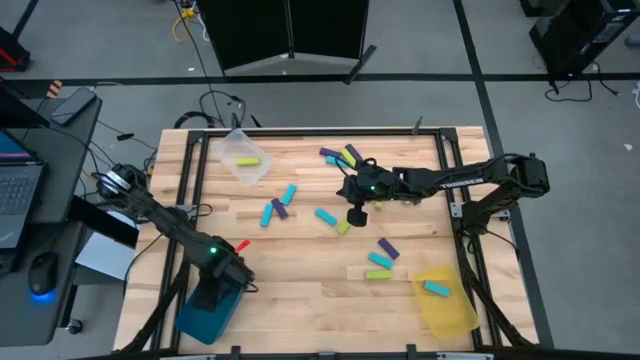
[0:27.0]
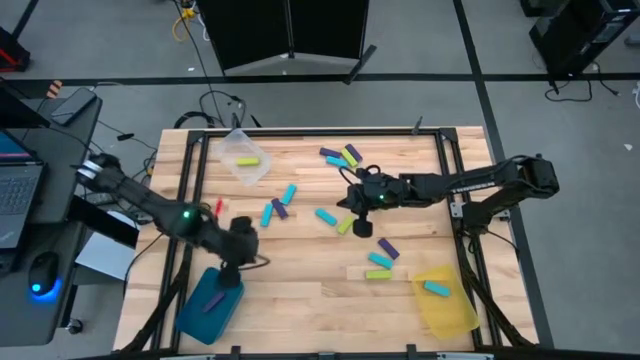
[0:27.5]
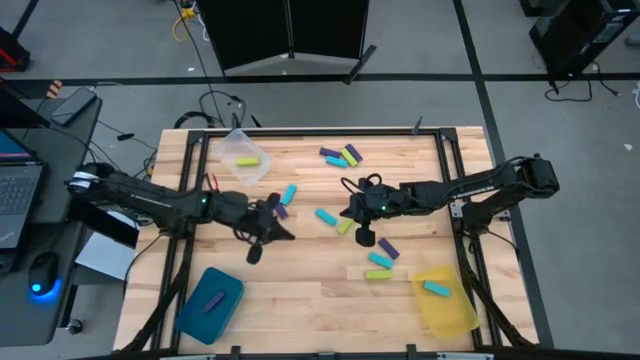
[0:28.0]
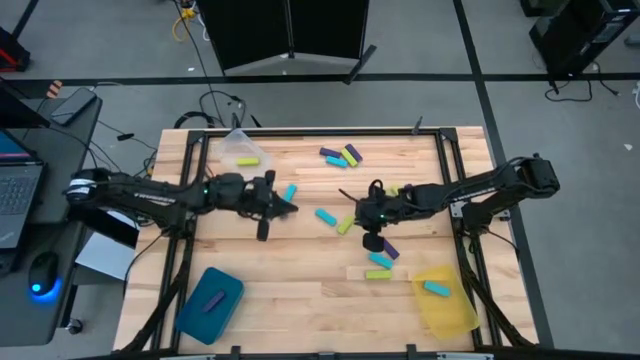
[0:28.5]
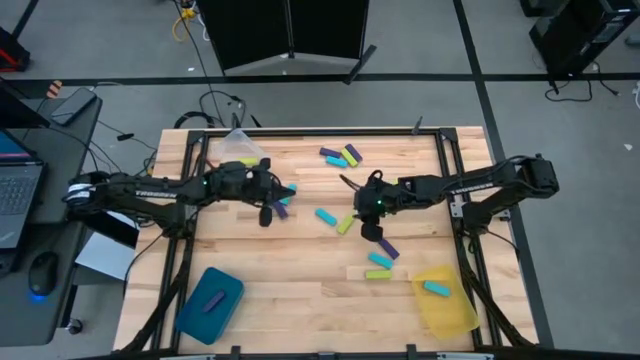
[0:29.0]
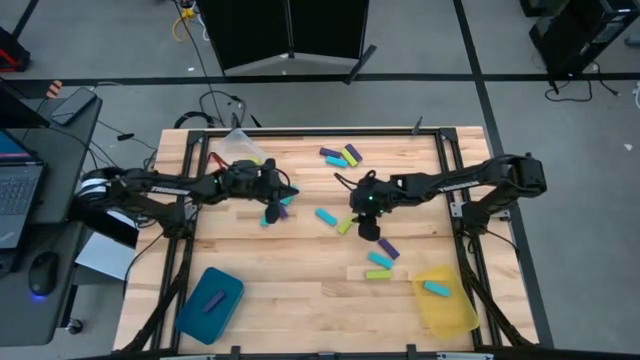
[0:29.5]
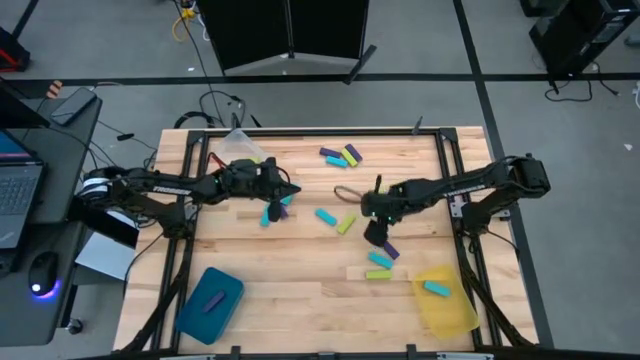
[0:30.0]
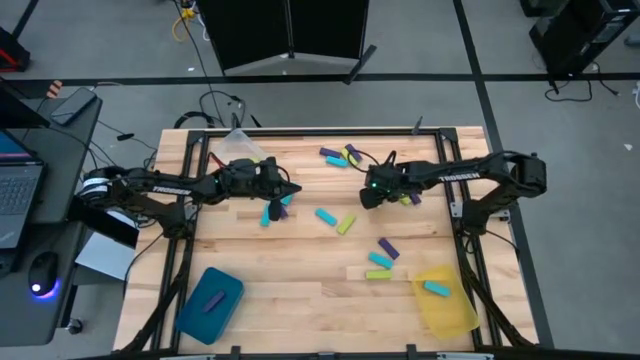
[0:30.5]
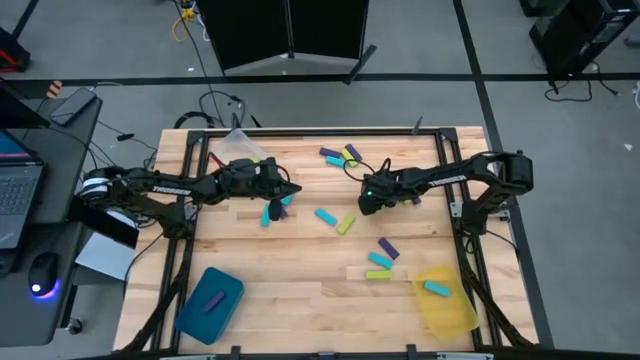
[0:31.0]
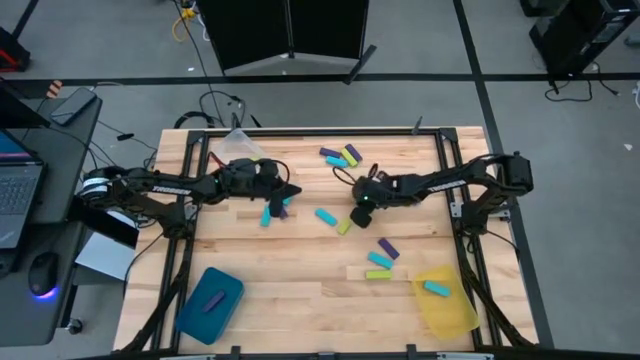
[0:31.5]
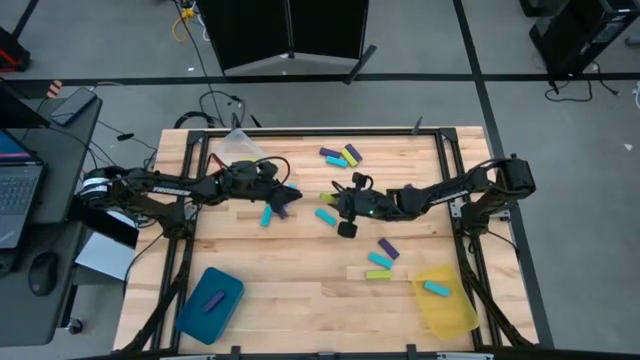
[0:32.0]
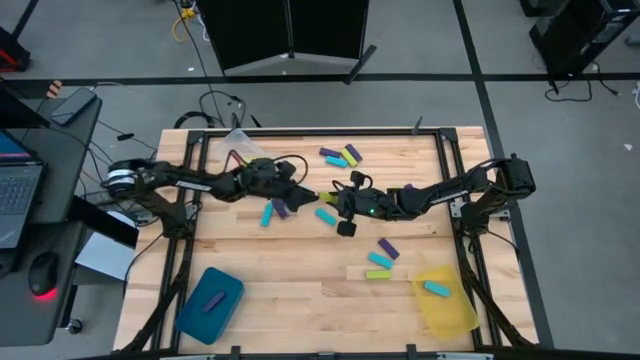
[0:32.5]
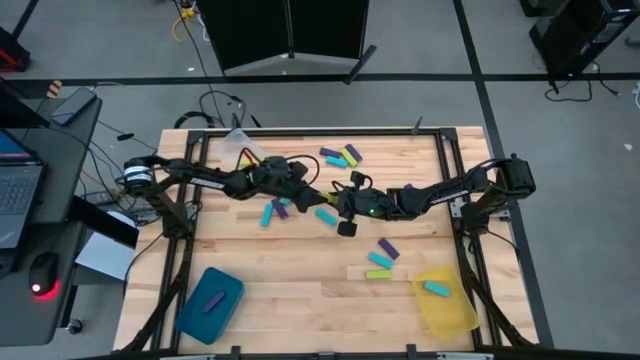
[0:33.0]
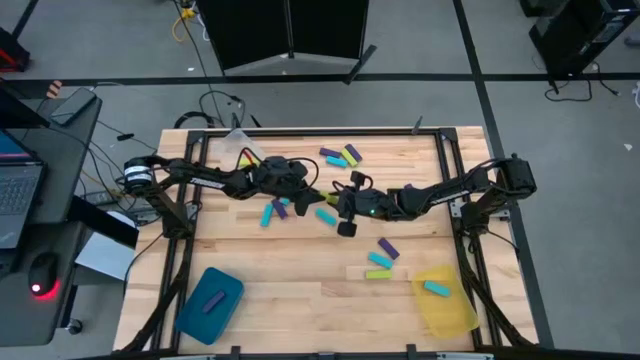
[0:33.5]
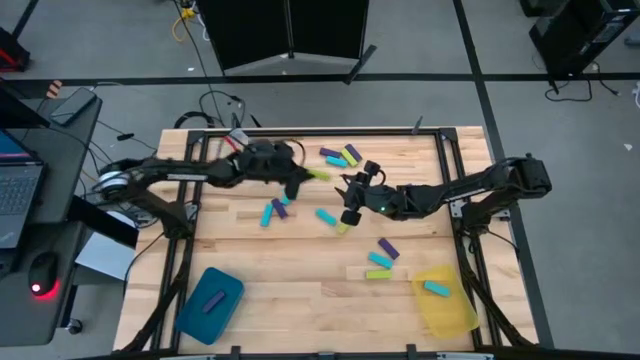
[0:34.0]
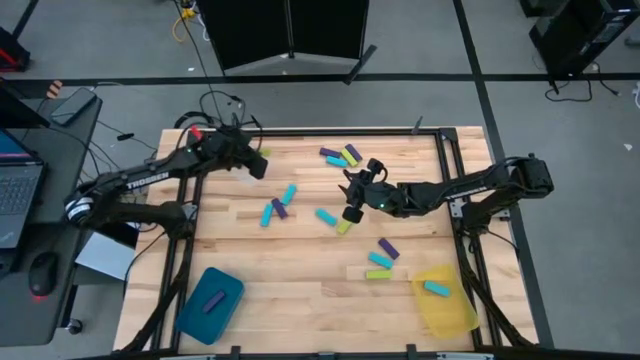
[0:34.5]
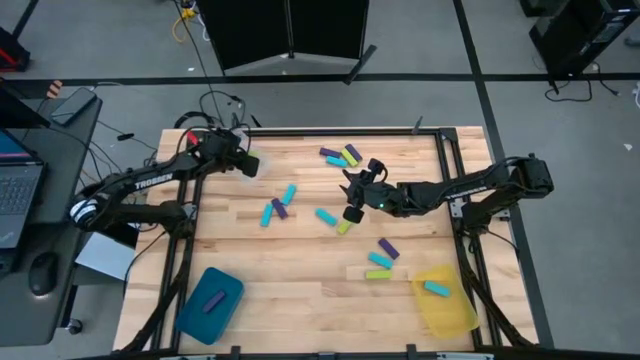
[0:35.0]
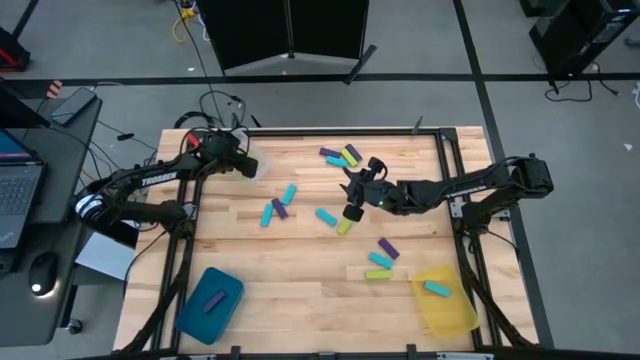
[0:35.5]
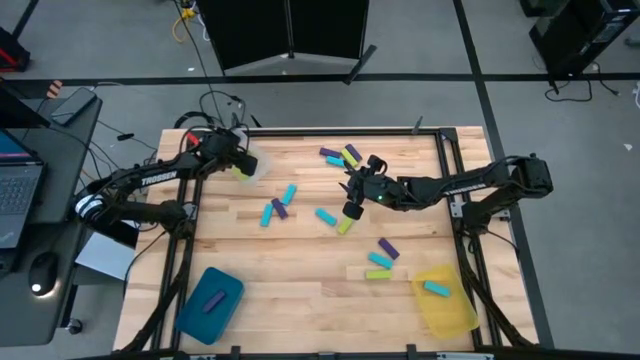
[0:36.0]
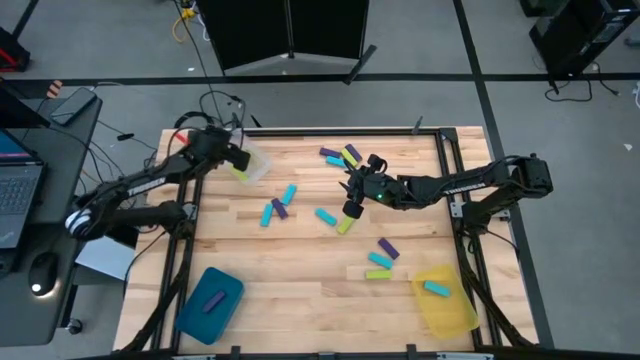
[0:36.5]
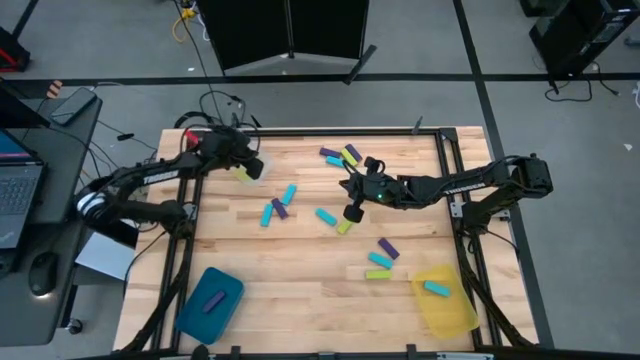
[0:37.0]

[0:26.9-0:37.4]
Task: Sort blocks
Put the green block into the transparent bin

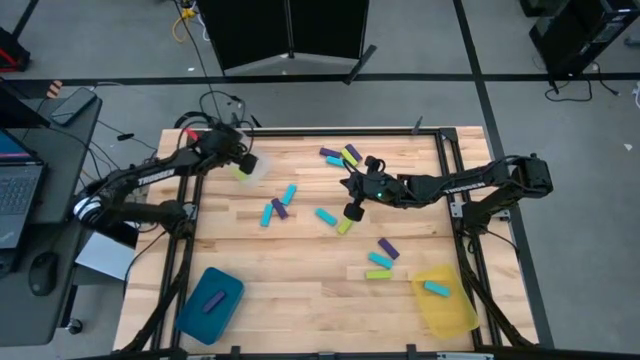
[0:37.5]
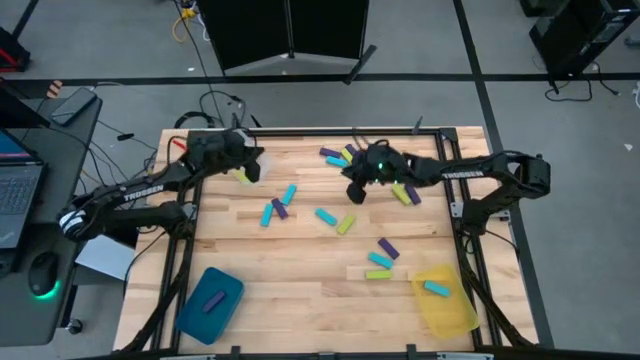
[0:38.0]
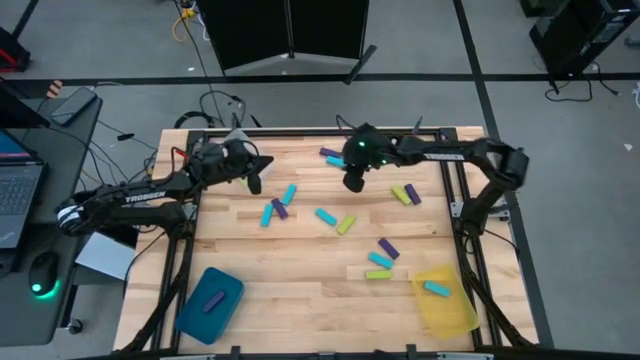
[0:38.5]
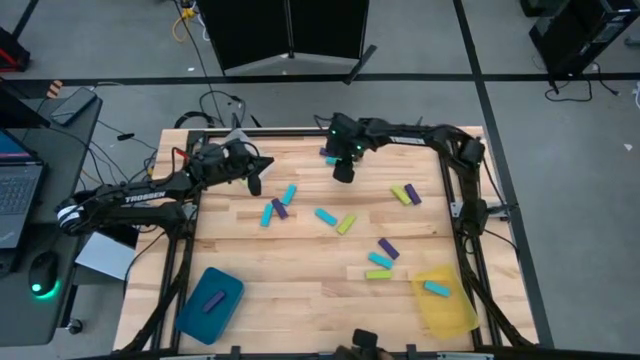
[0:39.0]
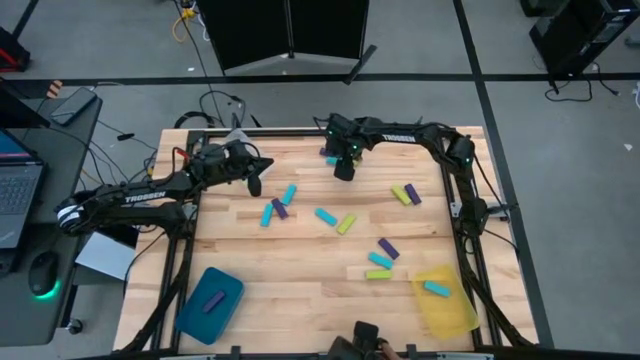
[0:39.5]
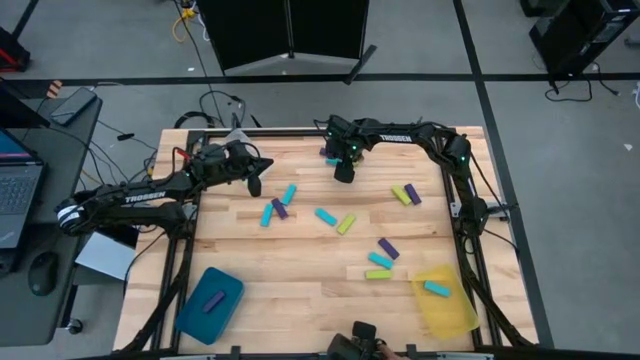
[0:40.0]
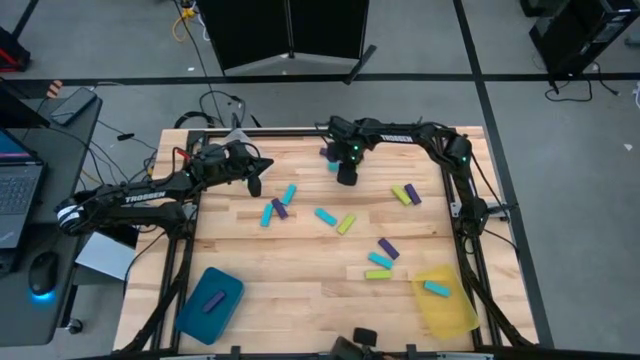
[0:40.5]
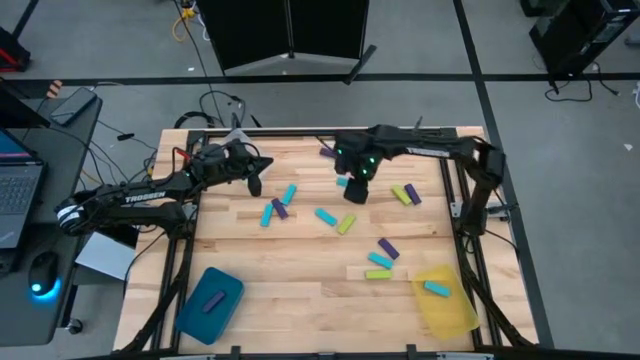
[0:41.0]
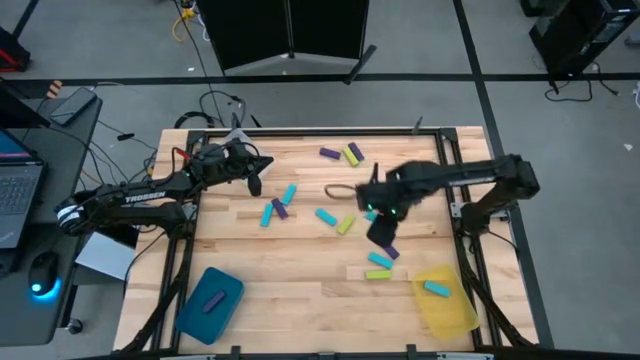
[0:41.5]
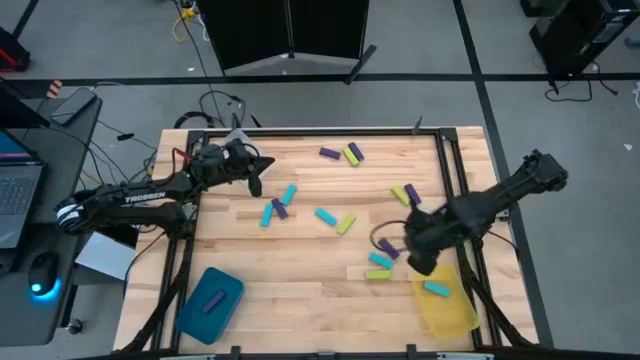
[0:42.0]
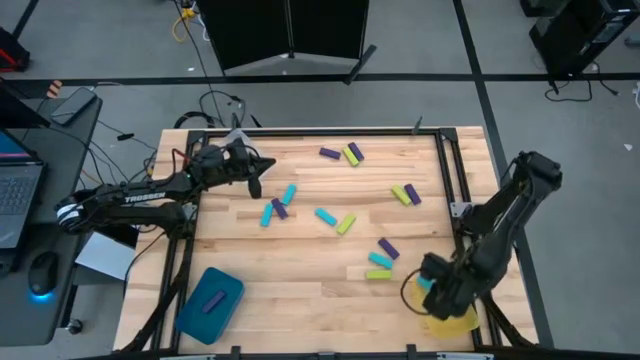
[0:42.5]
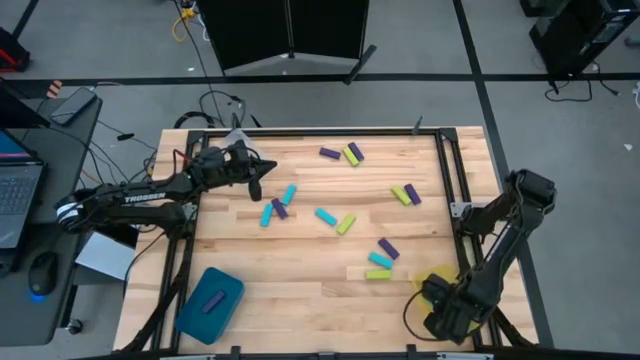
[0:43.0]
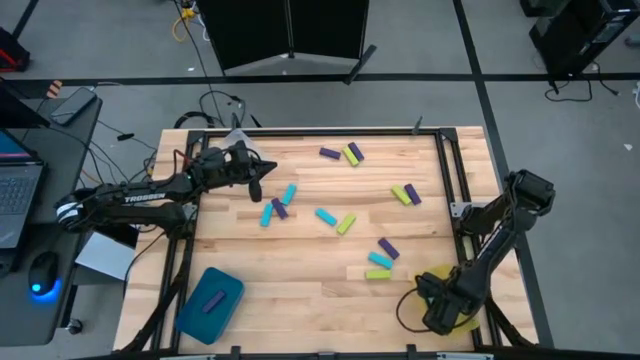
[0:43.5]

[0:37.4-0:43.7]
Put the blue block into the yellow bin

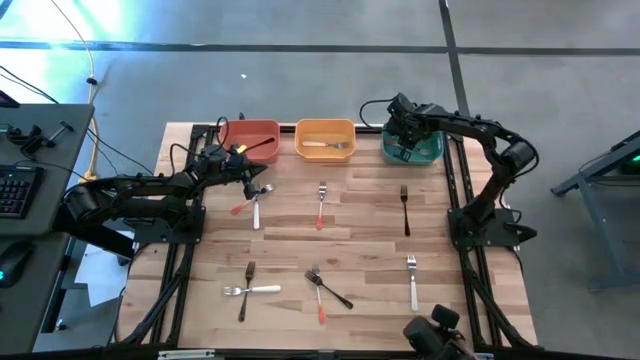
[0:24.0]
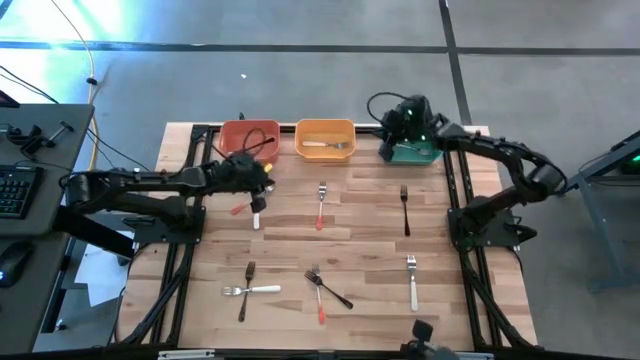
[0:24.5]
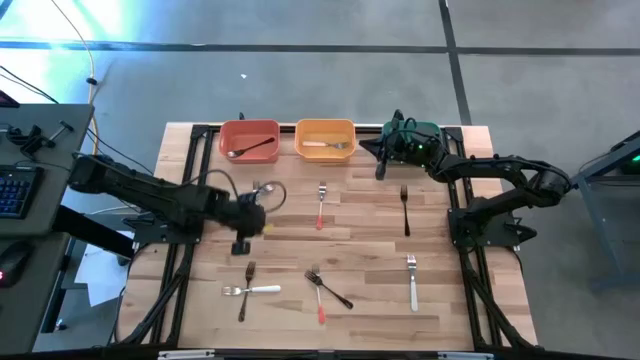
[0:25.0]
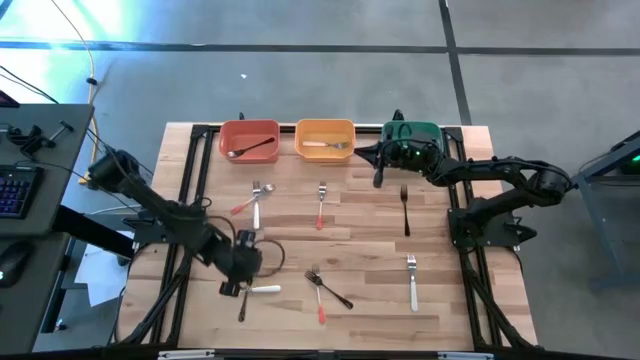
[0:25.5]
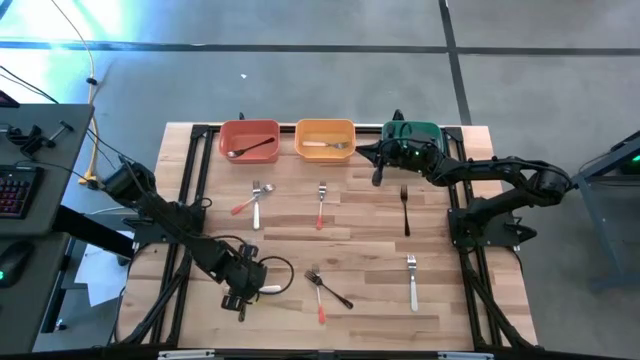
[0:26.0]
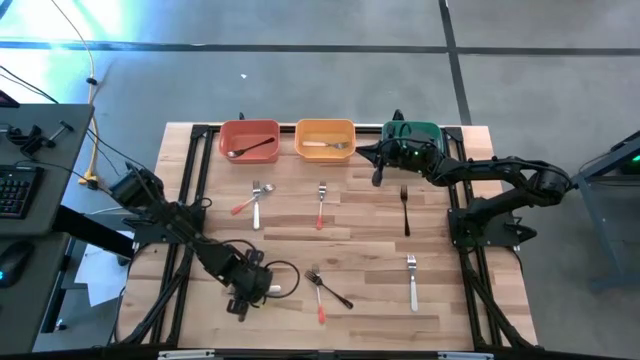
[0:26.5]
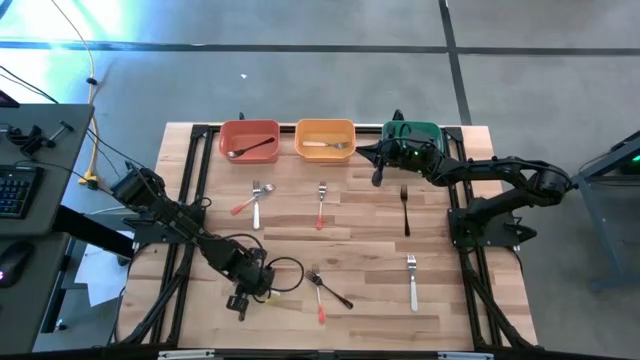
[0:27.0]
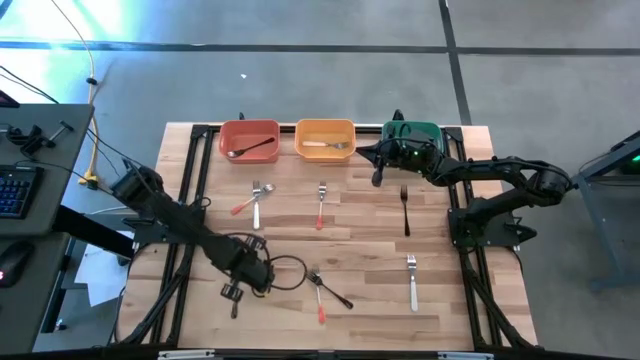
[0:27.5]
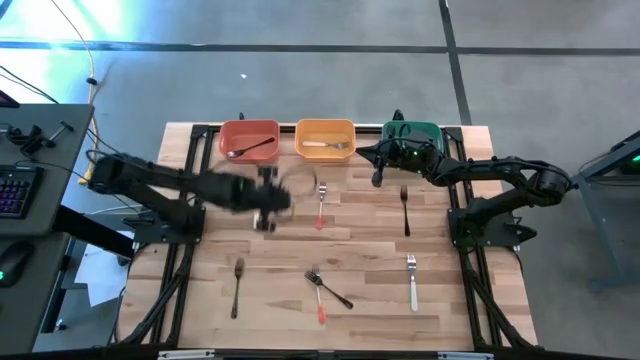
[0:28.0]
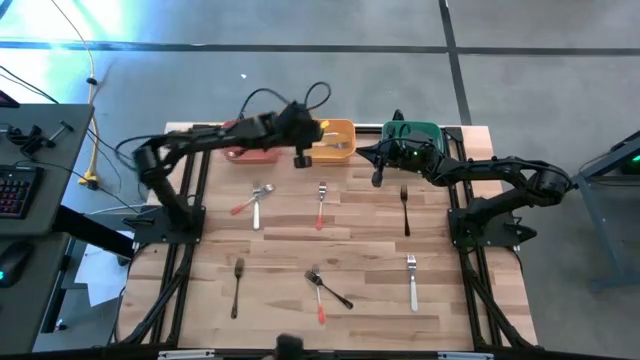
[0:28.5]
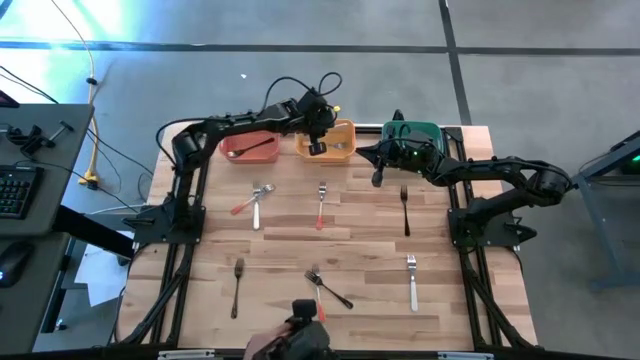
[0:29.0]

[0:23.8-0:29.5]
Task: Sort silverware by color (type)
Put the bottom left white fork into the yellow bin
